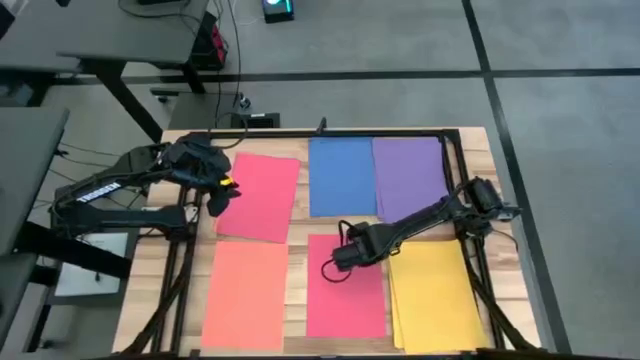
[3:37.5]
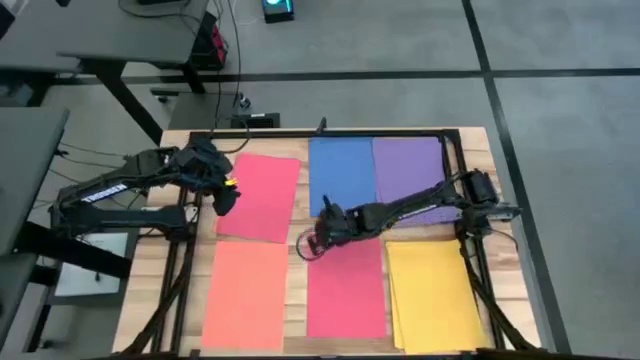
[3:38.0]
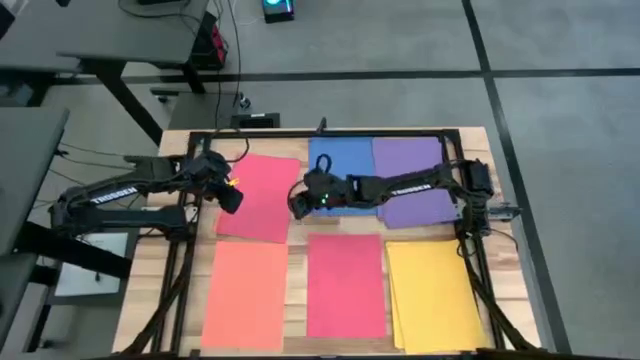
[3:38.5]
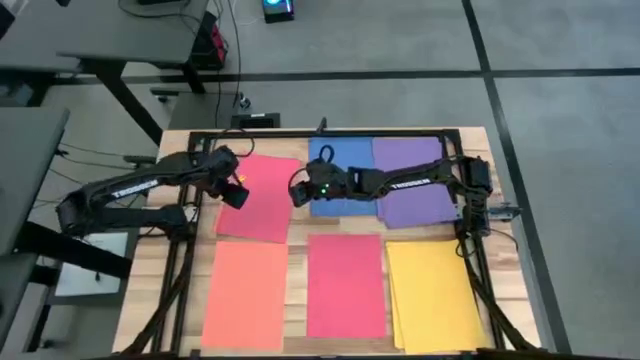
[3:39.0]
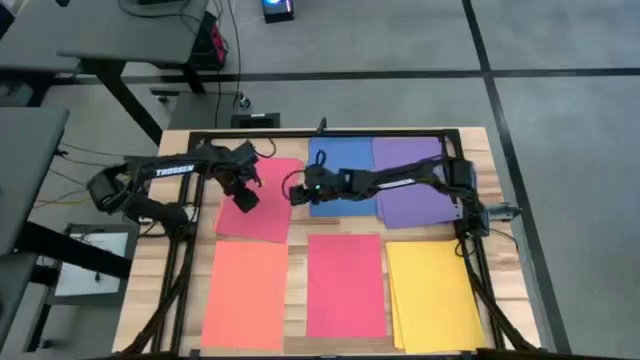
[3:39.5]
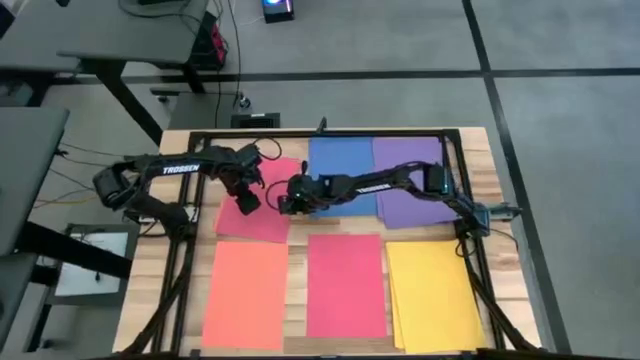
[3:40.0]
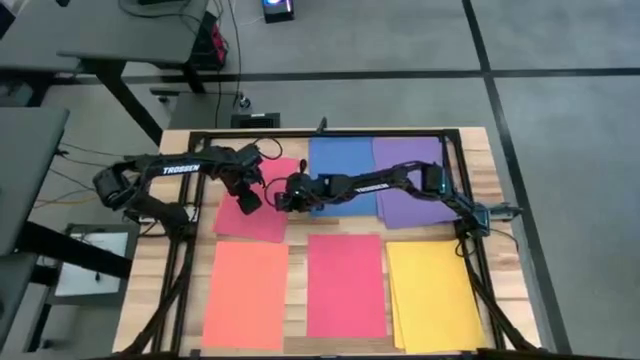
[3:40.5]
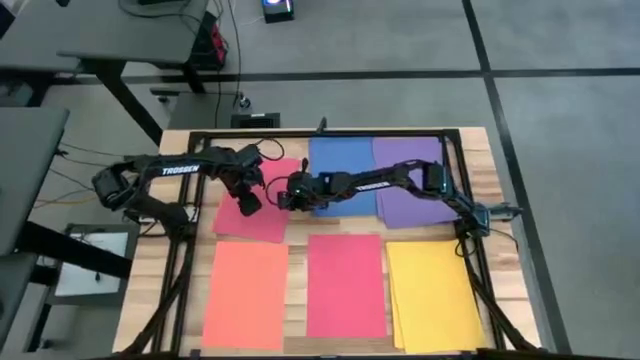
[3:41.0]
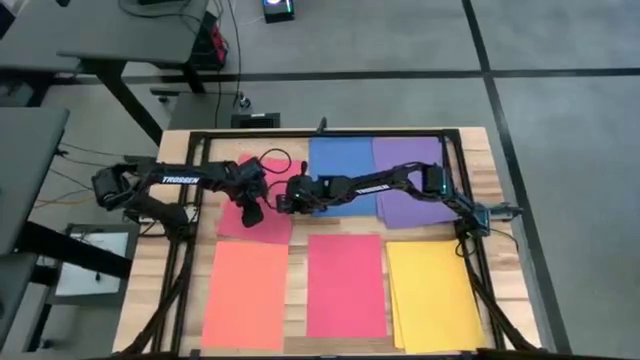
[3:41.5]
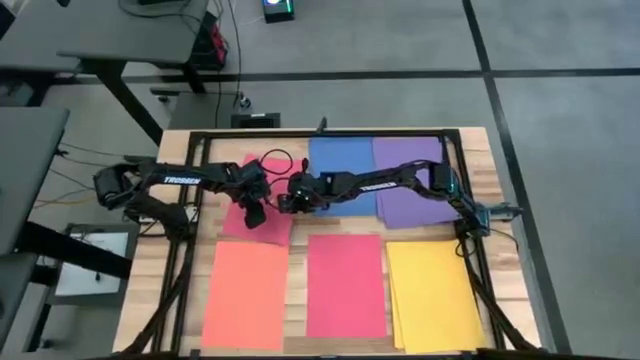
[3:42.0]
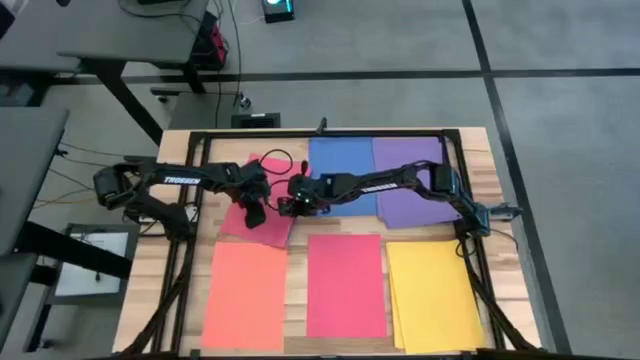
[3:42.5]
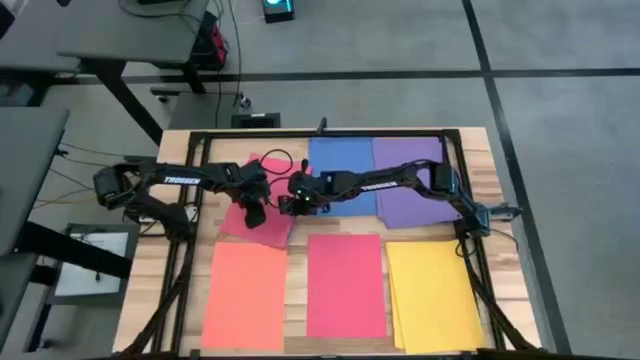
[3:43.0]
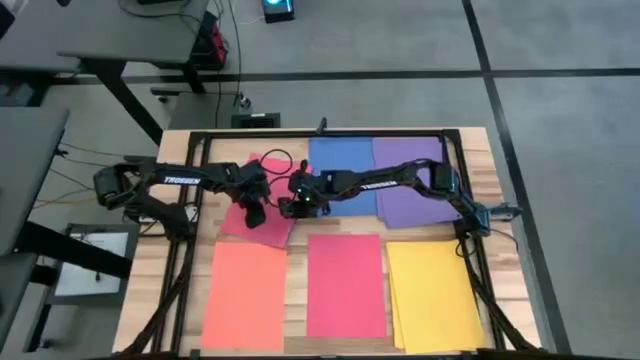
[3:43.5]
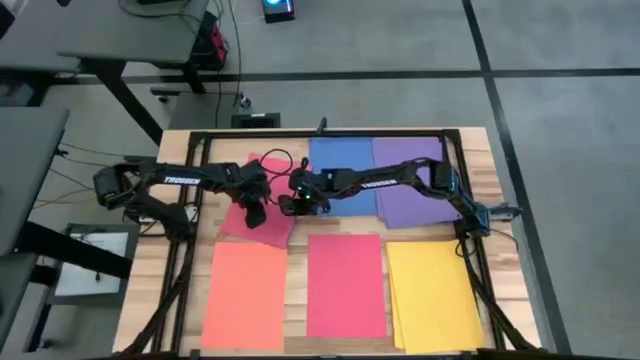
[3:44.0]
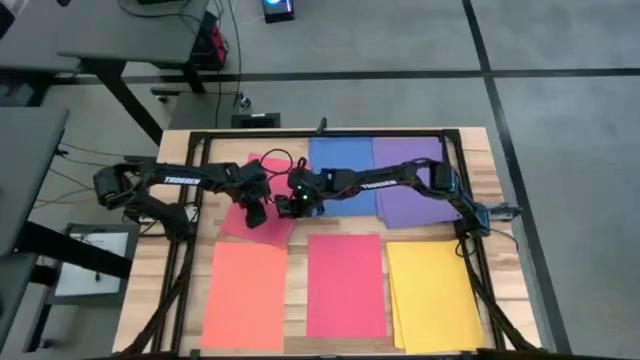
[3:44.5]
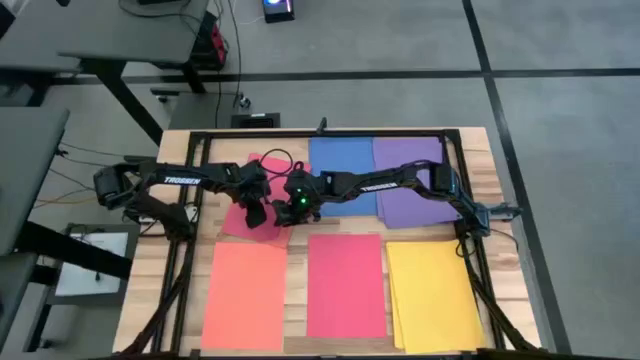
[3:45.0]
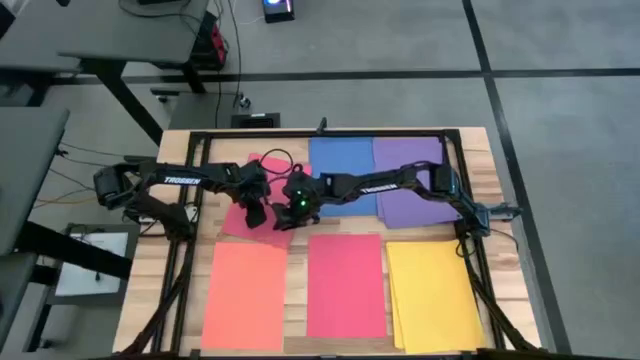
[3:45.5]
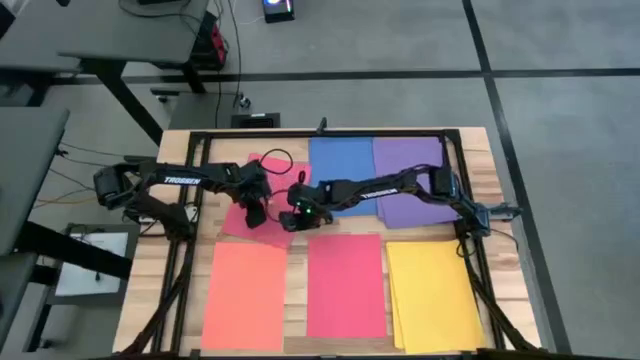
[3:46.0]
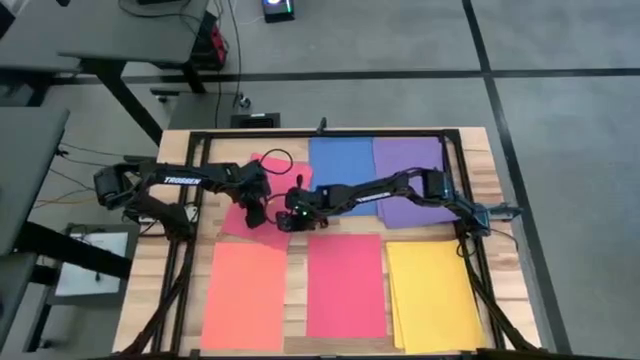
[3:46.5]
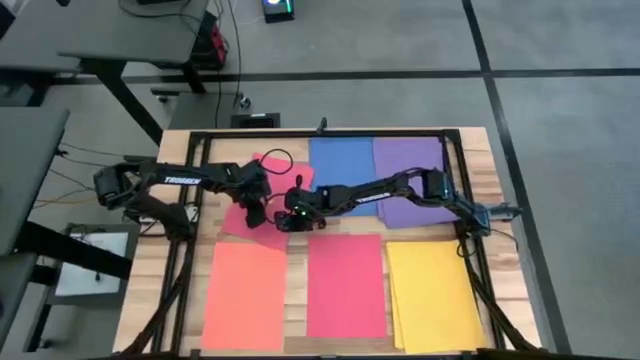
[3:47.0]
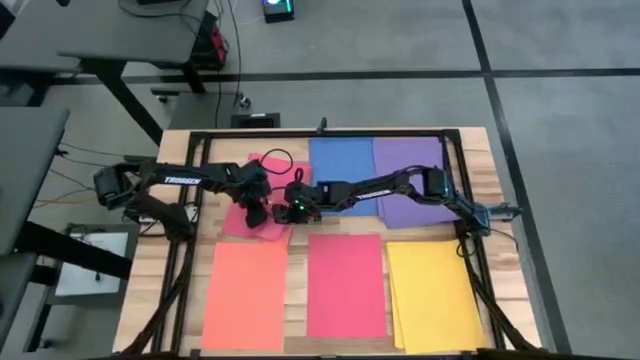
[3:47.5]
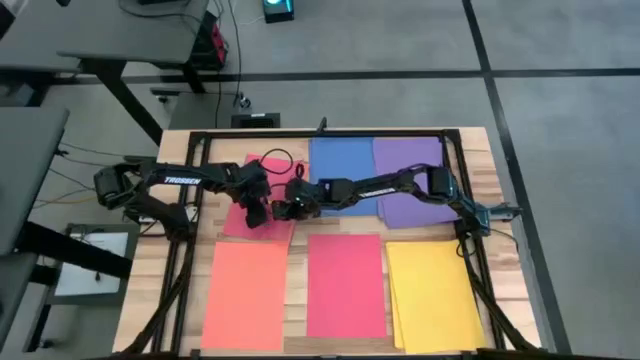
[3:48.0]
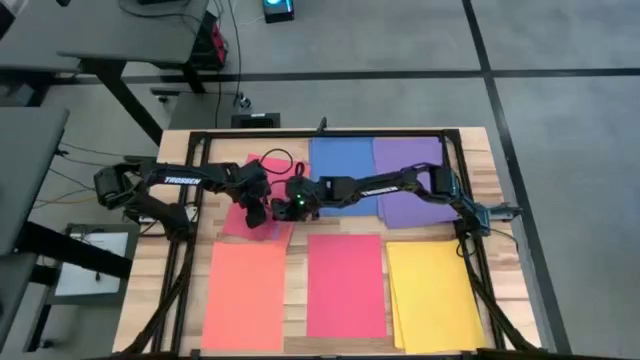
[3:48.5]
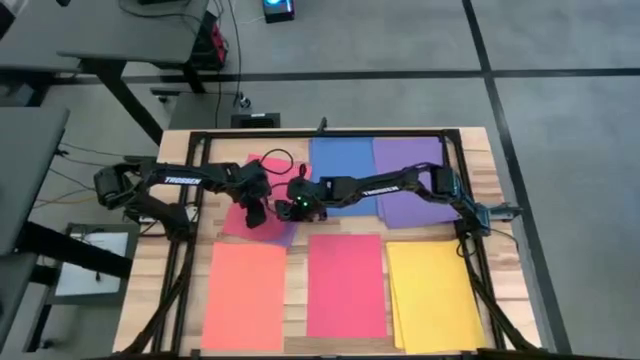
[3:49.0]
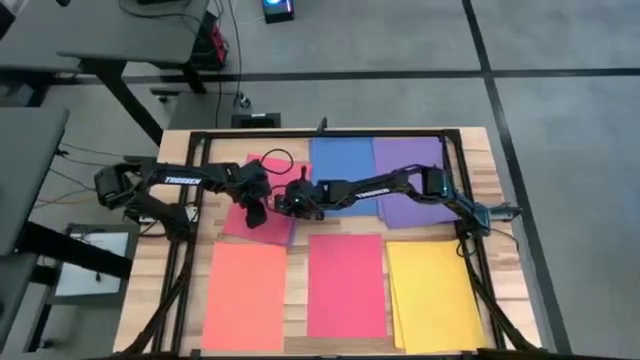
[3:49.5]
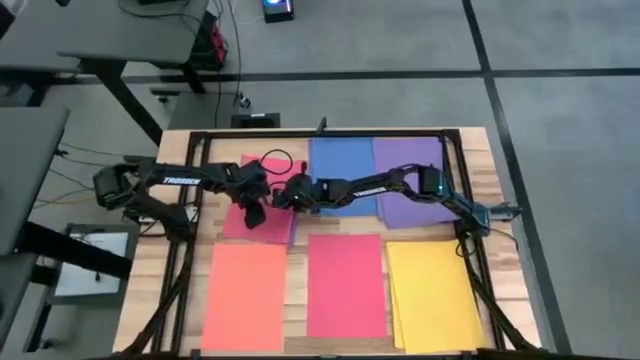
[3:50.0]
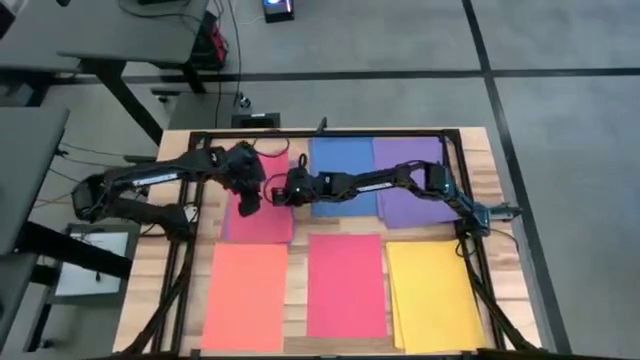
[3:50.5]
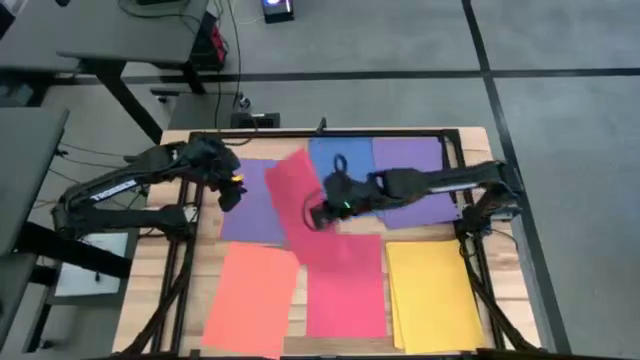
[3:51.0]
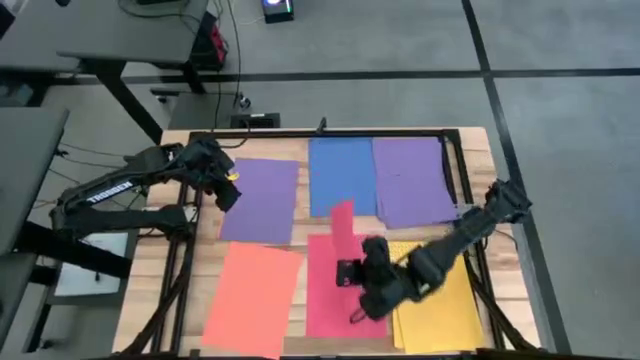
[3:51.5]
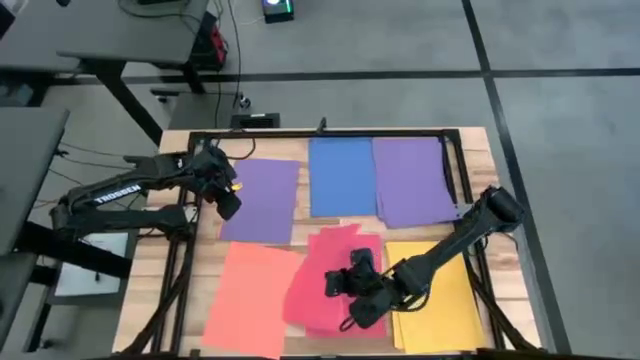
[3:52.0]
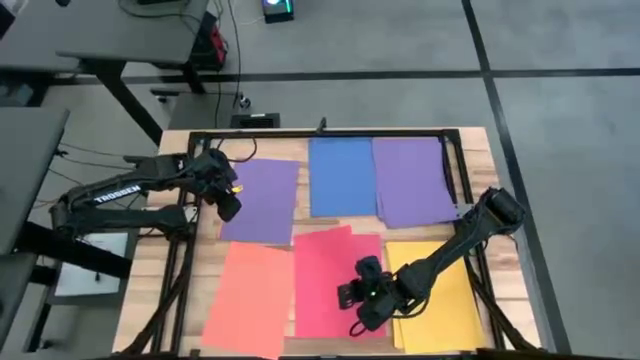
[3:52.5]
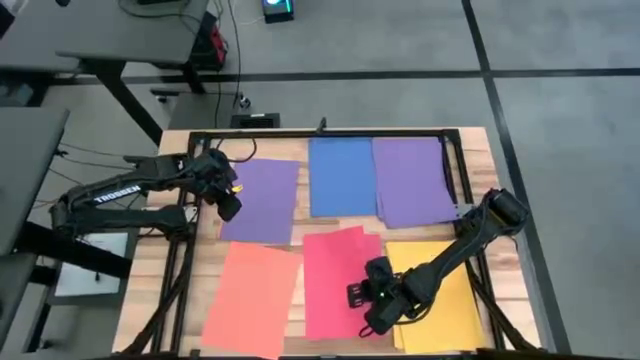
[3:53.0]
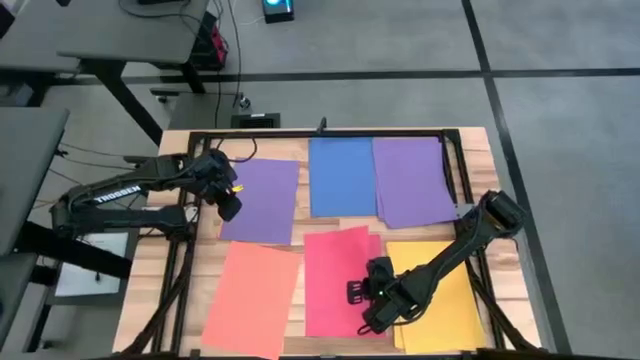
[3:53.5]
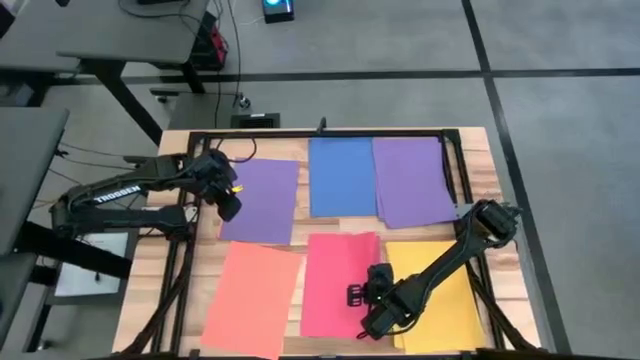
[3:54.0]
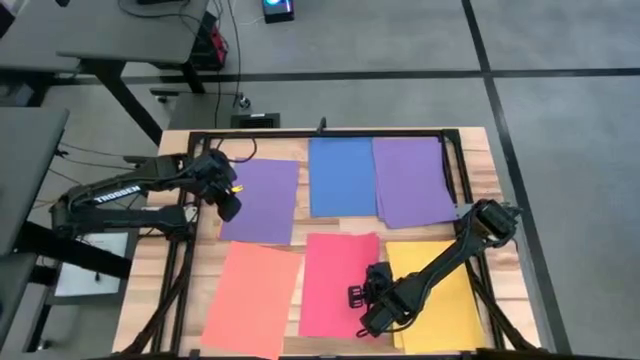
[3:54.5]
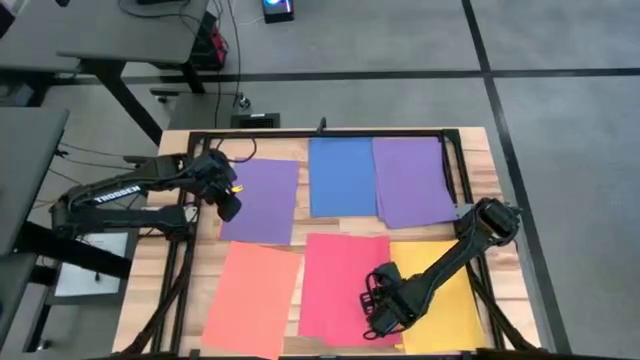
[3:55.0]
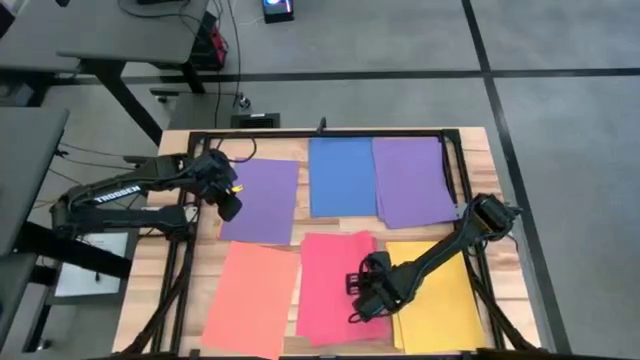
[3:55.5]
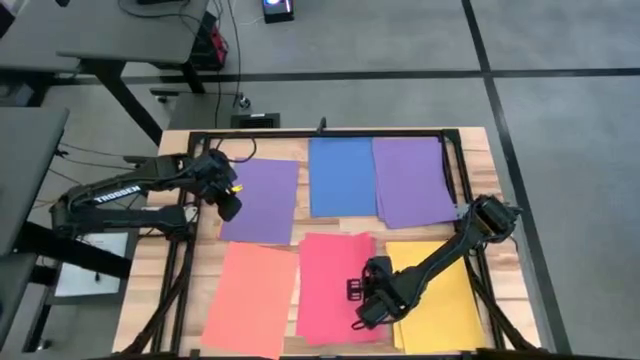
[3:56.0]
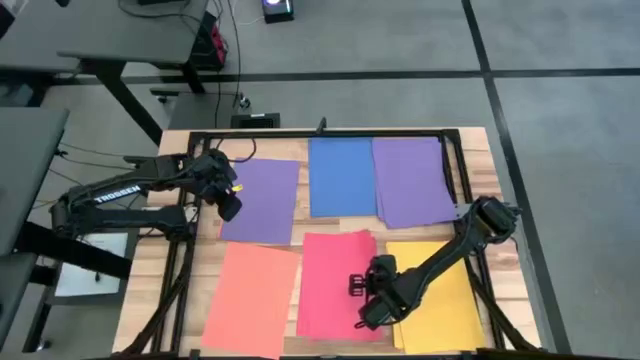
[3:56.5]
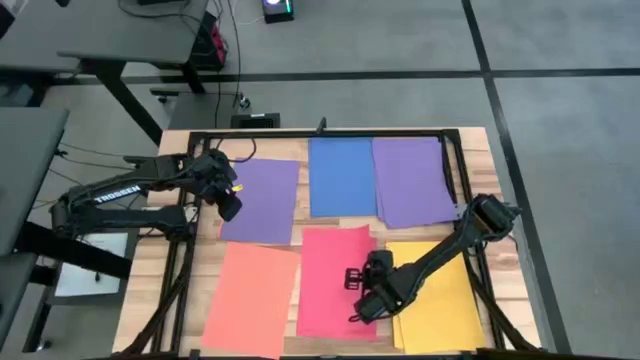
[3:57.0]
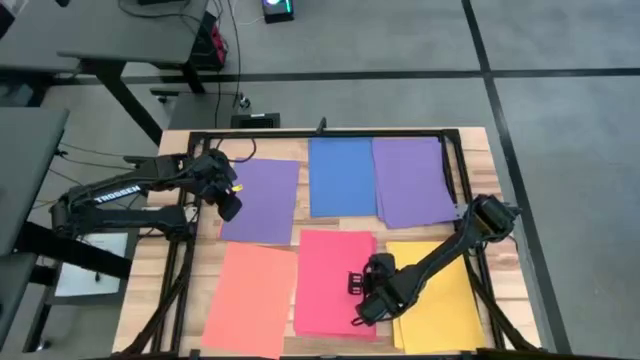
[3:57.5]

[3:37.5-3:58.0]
Task: Organize paper
Stack the pink paper on the bottom center pink papers

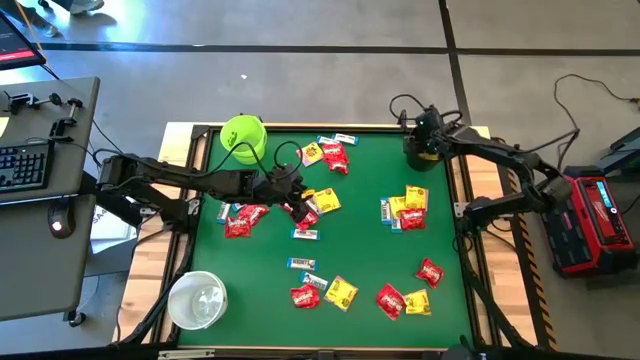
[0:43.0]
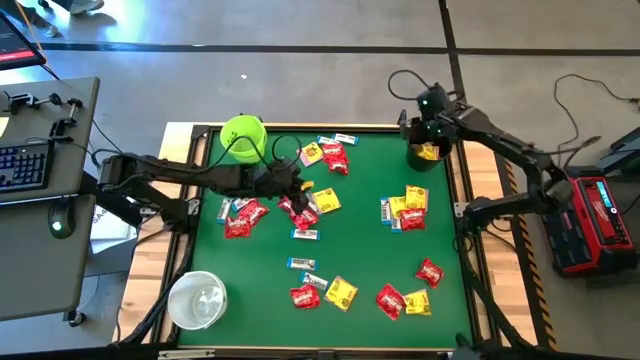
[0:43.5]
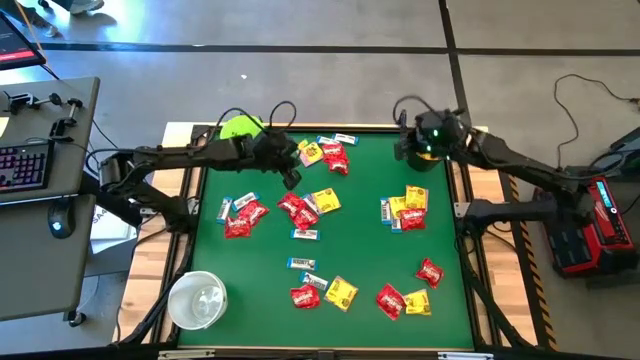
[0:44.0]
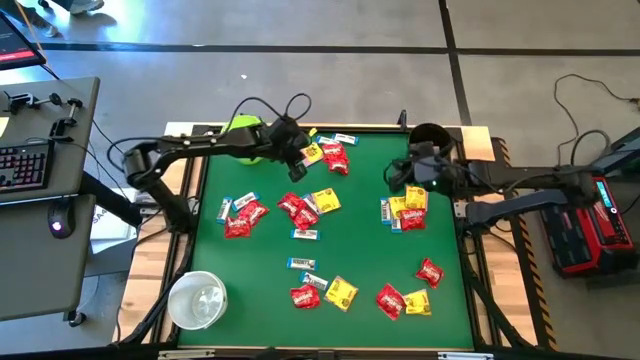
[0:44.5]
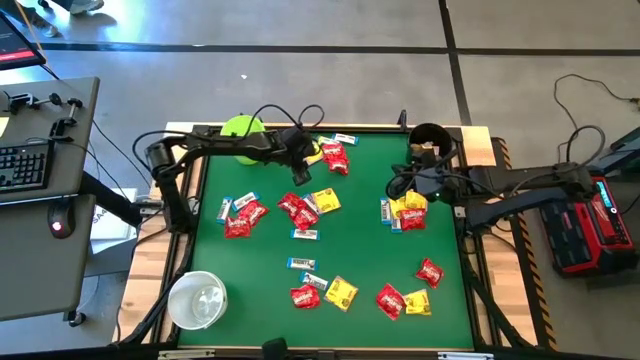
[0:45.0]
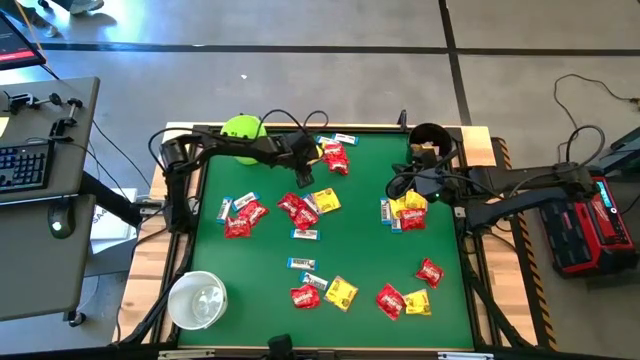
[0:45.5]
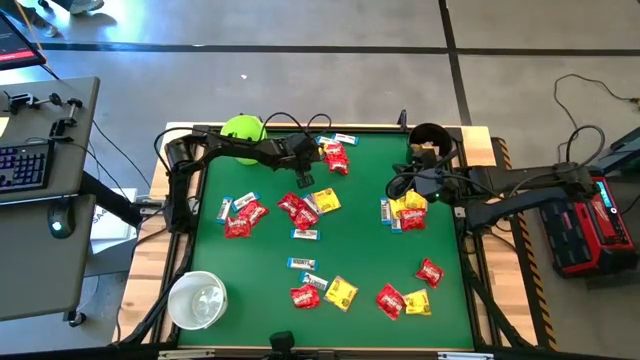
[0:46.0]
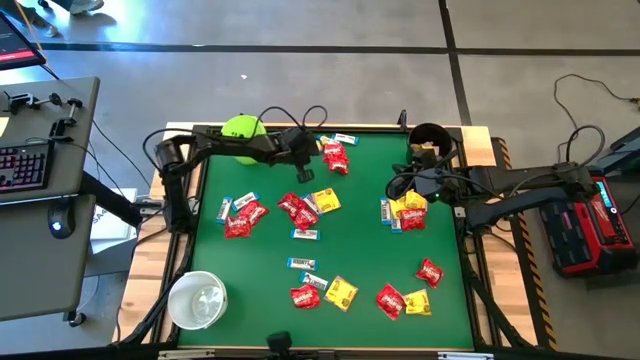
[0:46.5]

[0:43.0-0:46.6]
Task: Sort candy by brand, put in halloween buckets
Put the yellow candy into the black bucket
